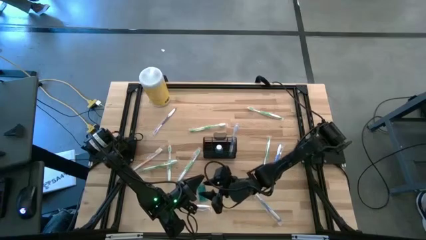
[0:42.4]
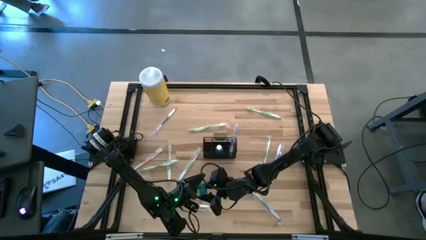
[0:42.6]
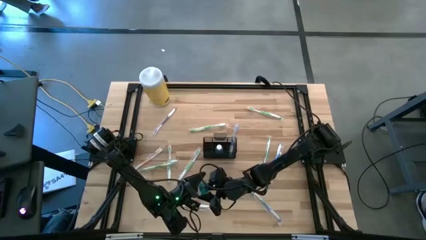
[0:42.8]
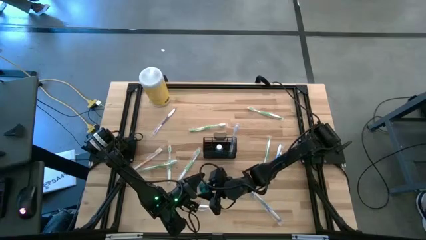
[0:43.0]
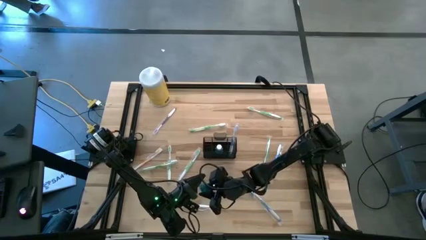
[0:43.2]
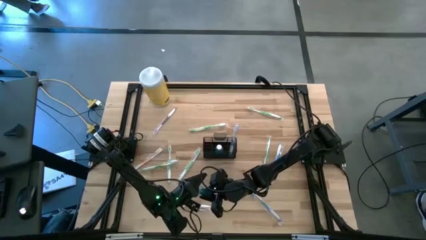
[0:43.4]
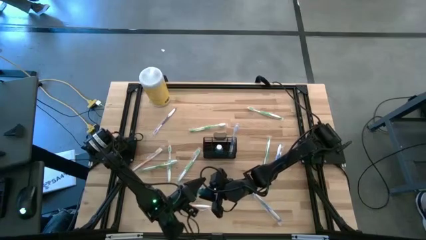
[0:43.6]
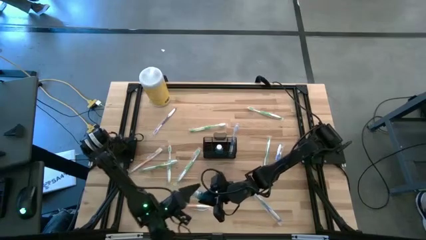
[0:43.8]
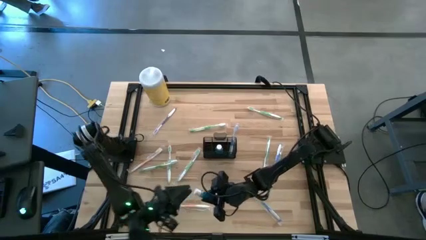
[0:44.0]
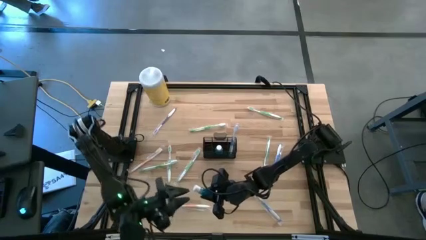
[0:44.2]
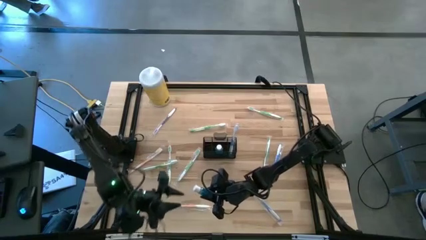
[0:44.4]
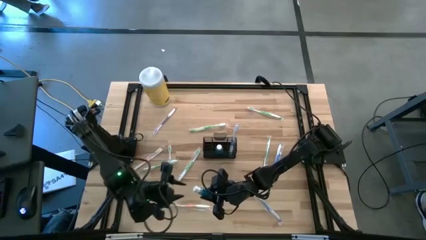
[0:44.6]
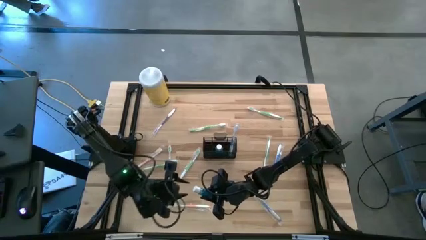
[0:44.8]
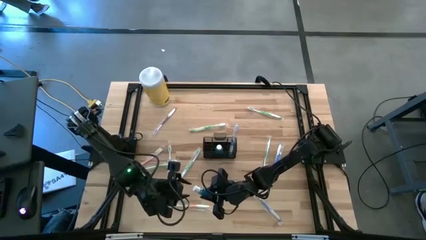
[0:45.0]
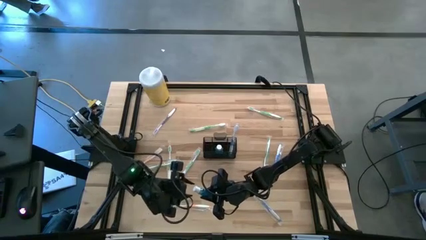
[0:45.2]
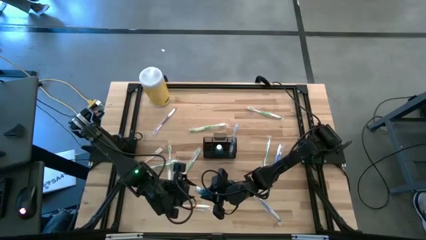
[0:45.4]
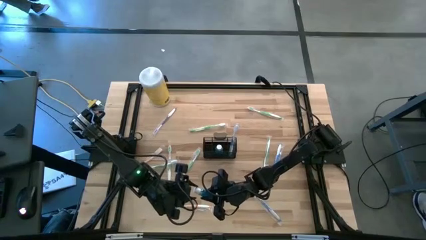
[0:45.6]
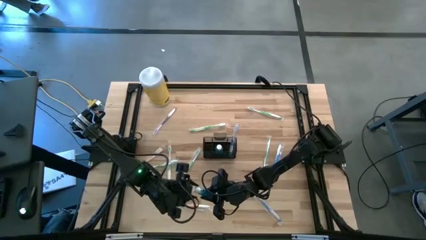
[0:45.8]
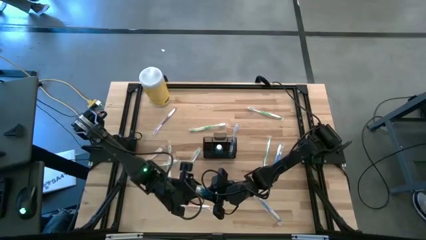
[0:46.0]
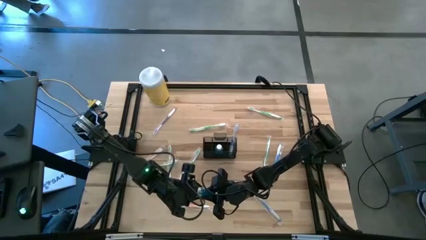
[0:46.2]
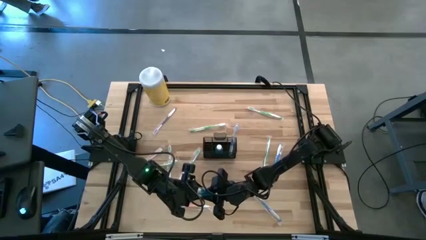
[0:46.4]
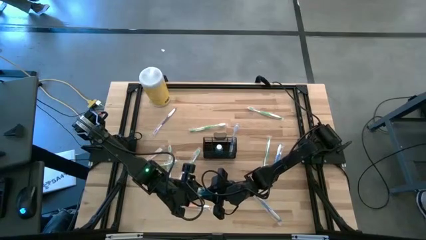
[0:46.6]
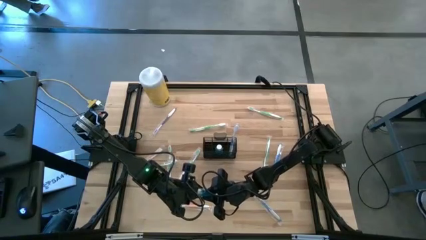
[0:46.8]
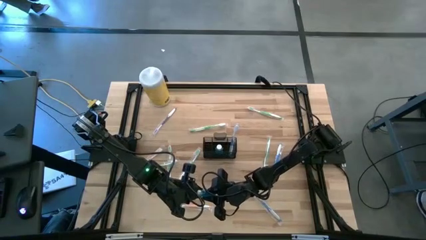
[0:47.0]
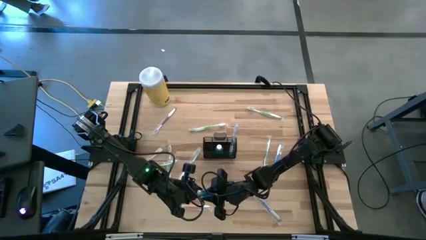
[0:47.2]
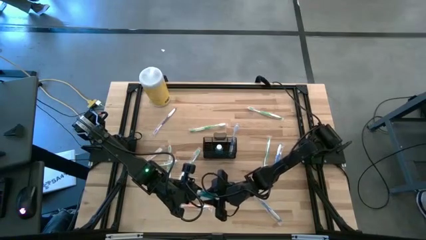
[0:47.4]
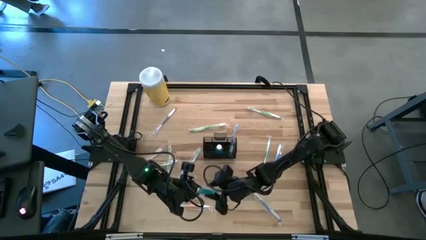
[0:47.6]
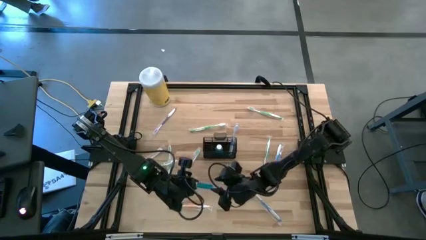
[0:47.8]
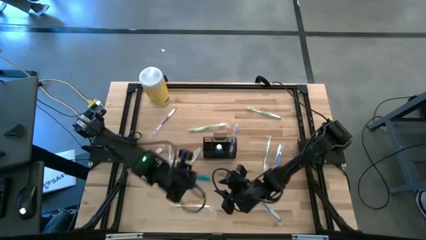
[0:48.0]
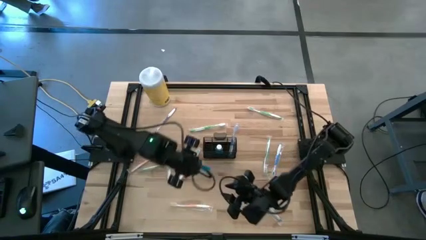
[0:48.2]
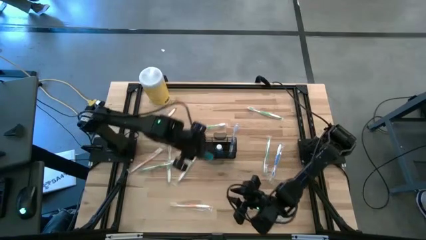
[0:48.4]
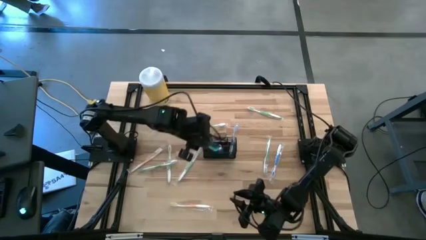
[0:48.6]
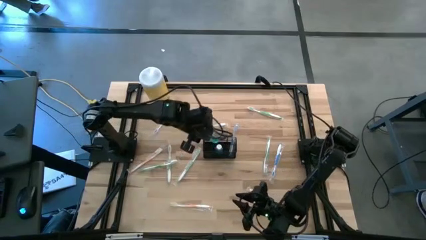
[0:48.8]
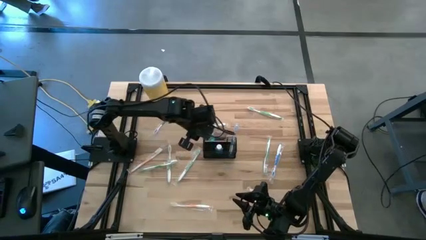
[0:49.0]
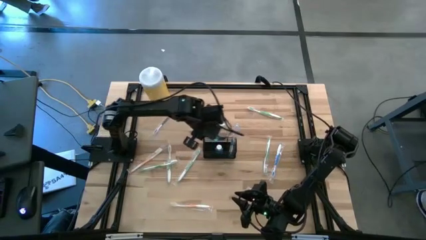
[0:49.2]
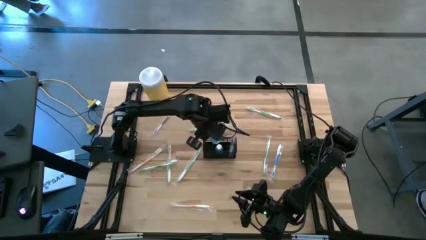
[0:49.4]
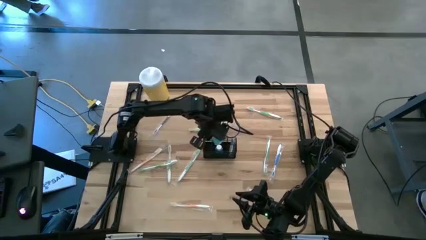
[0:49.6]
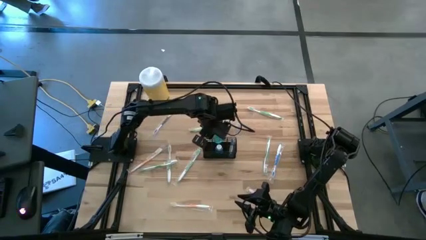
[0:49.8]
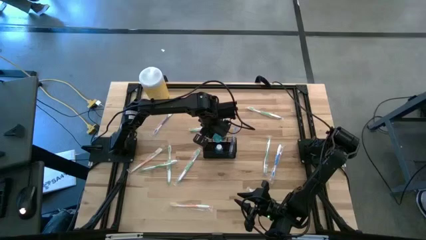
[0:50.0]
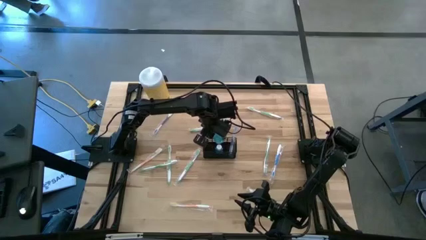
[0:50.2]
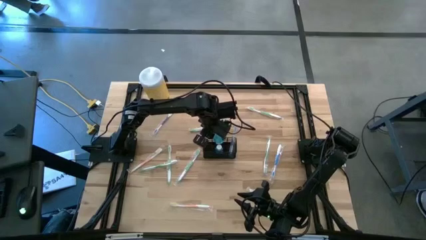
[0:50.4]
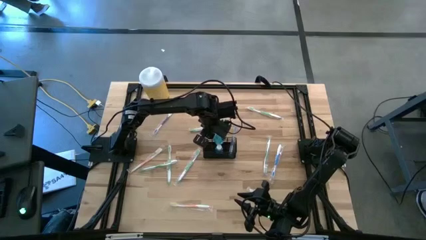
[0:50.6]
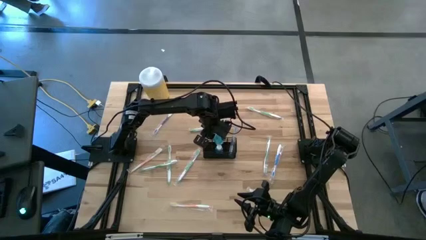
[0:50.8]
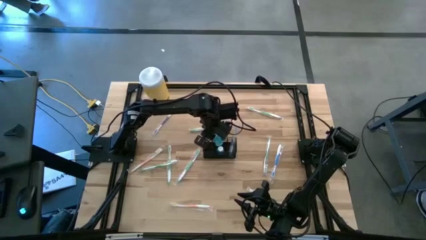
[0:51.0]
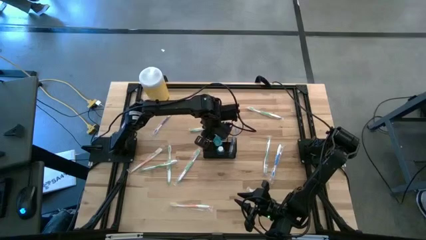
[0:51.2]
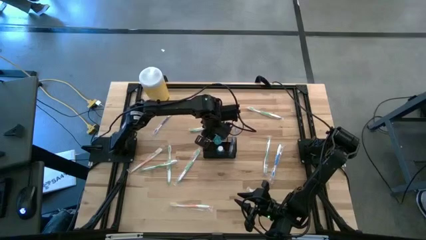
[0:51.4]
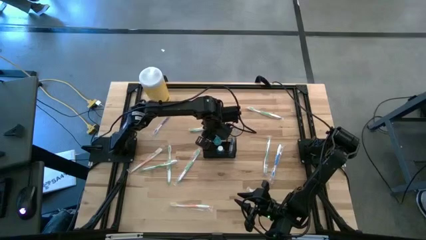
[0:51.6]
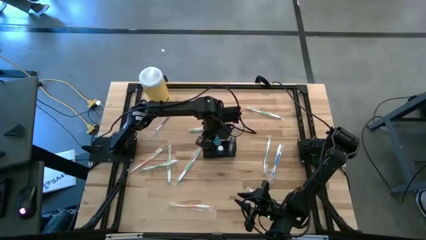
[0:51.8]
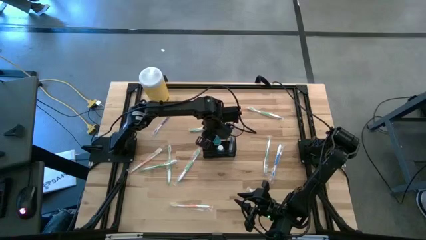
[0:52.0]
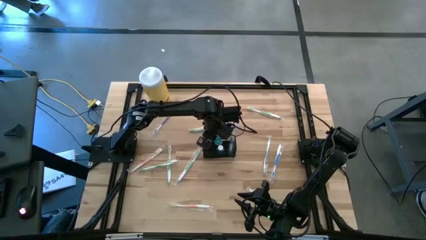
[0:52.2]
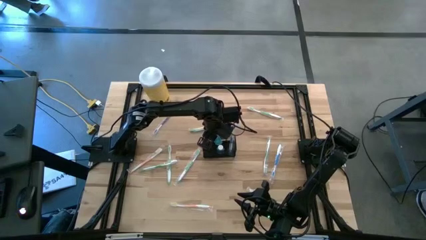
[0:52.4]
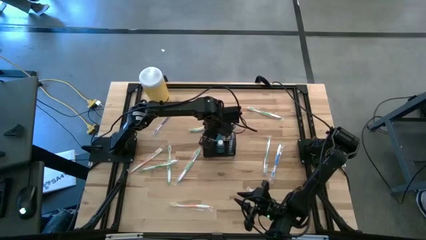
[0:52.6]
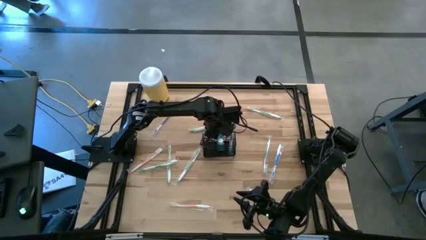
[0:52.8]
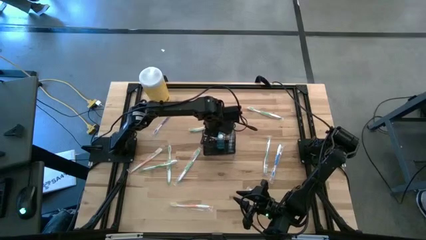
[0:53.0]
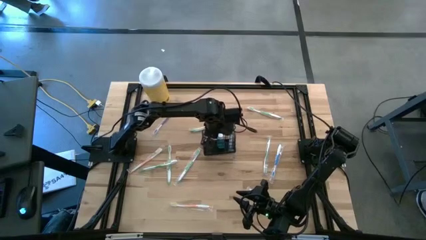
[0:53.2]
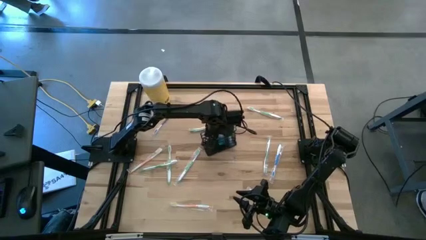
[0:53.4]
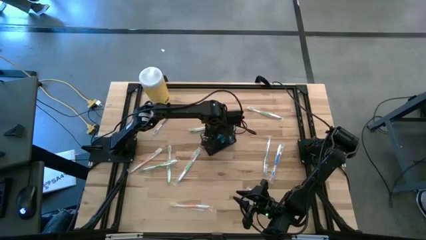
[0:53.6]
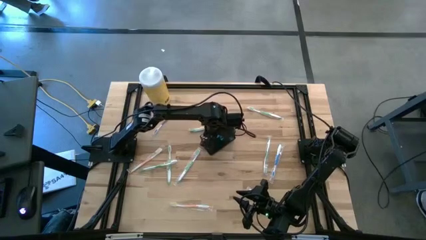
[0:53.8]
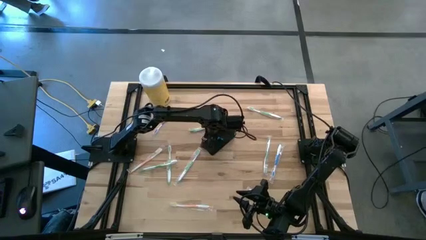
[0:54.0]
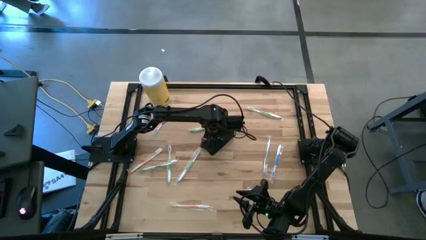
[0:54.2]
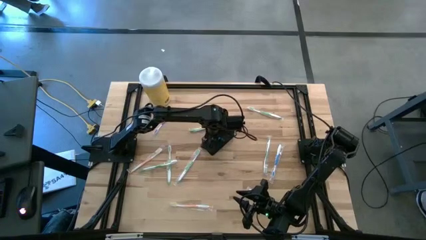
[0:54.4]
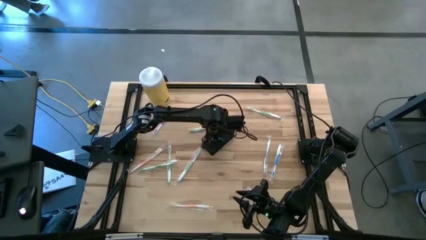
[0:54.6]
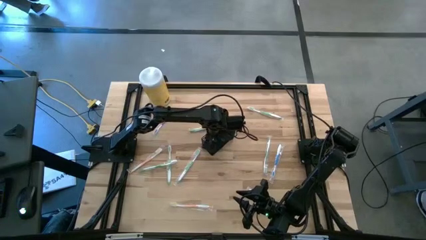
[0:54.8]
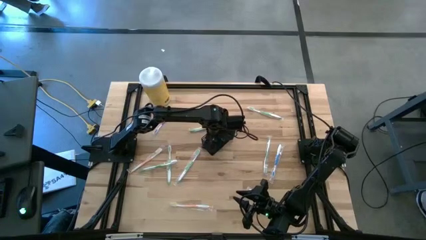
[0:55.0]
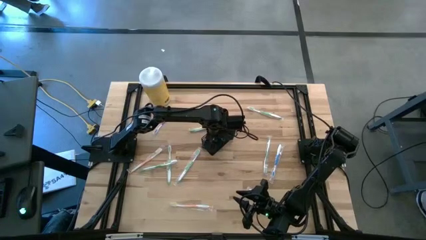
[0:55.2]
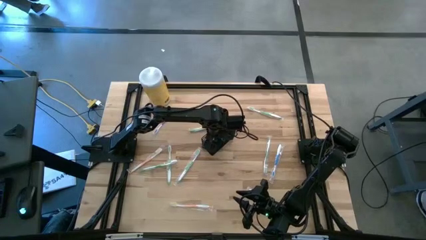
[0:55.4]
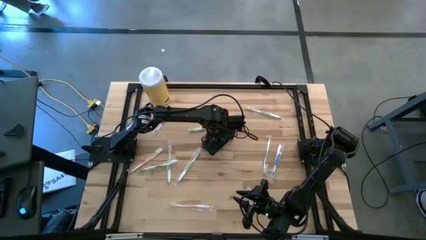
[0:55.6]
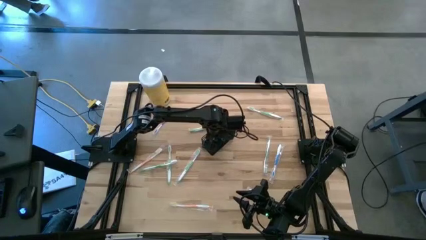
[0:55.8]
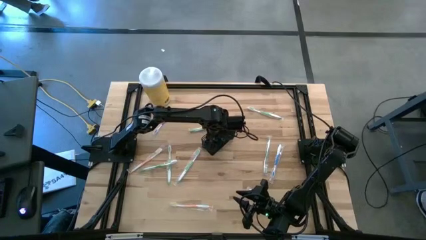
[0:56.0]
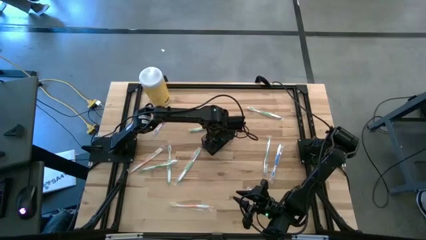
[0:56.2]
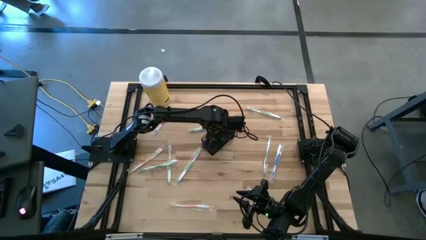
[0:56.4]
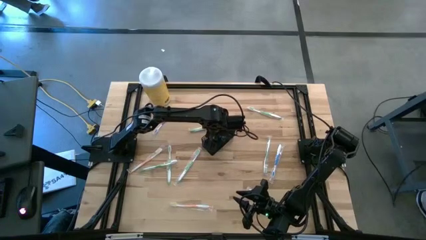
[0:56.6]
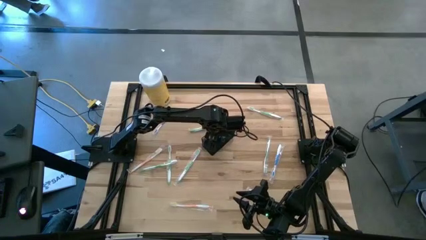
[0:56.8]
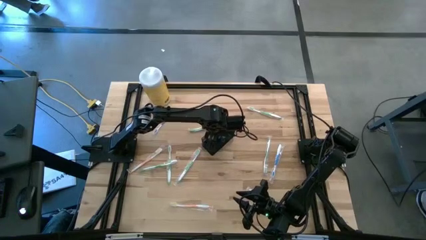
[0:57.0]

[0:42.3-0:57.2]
Task: Pick & Place toothbrushing station
Put the mouthwash into the wire organizer

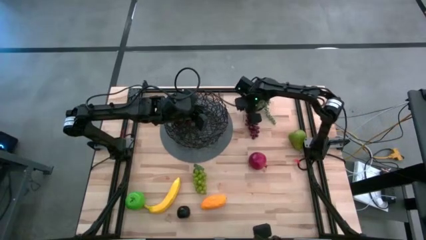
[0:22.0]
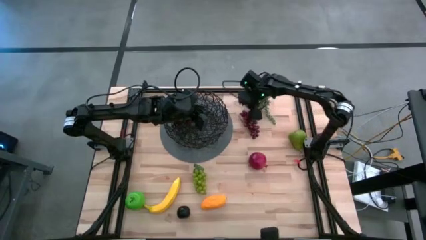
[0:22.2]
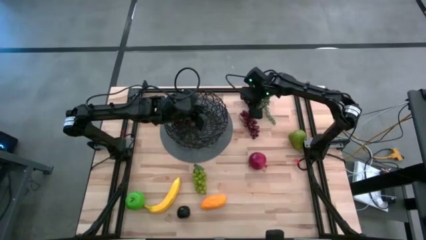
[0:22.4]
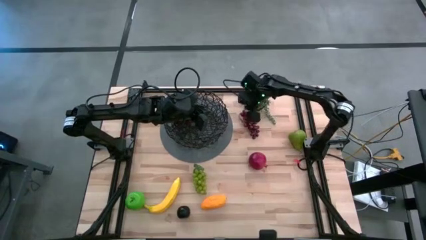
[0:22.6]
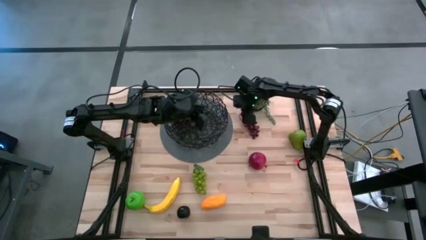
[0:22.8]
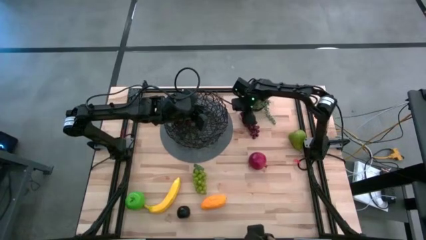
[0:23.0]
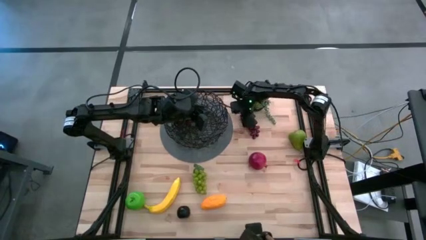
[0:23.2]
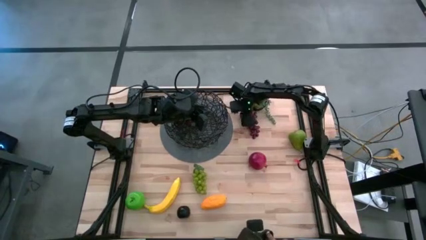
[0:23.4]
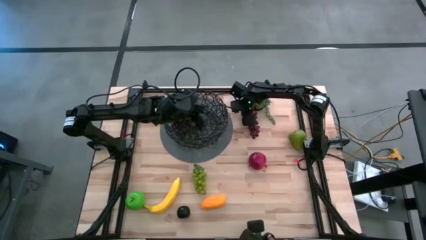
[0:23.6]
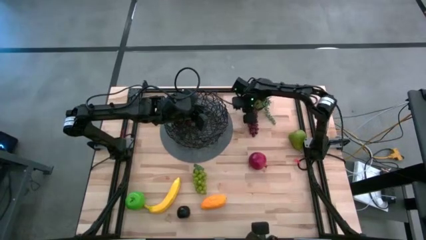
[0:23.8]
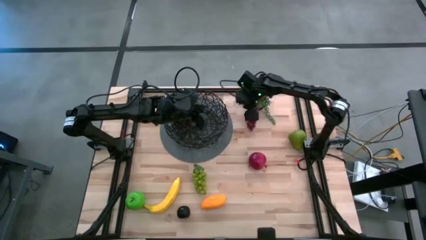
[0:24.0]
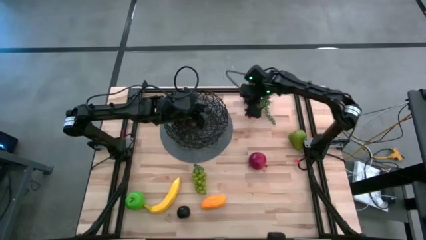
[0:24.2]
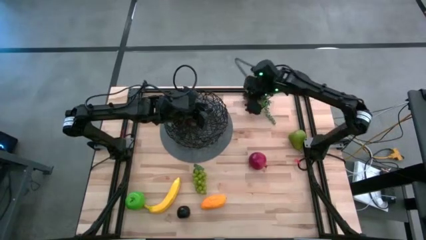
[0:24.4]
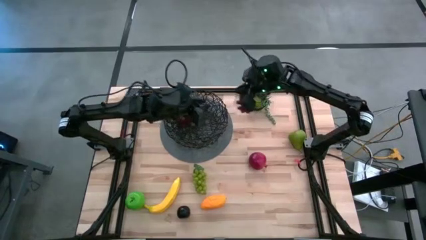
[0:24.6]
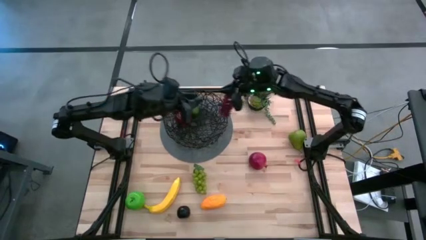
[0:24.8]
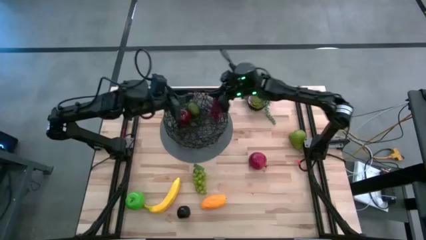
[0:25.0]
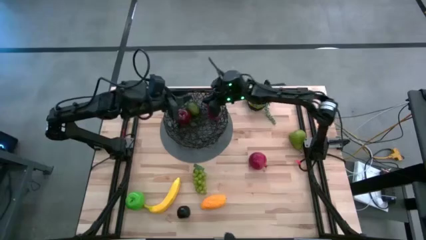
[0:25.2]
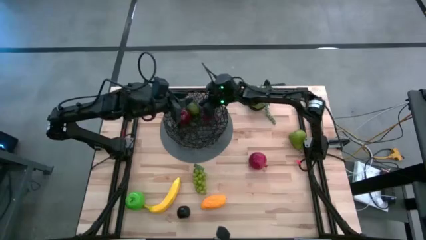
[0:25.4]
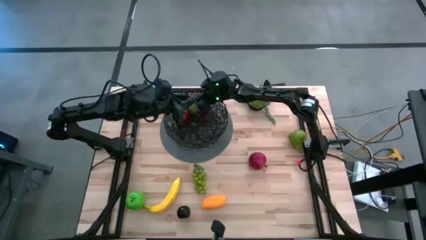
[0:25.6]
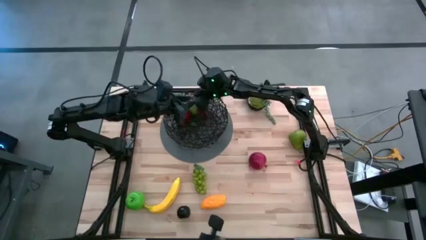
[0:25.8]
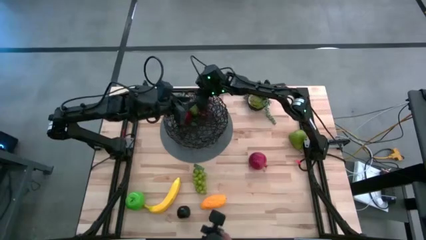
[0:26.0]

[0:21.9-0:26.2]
Task: Build produce basket
Put the red grapes into the black wire basket
